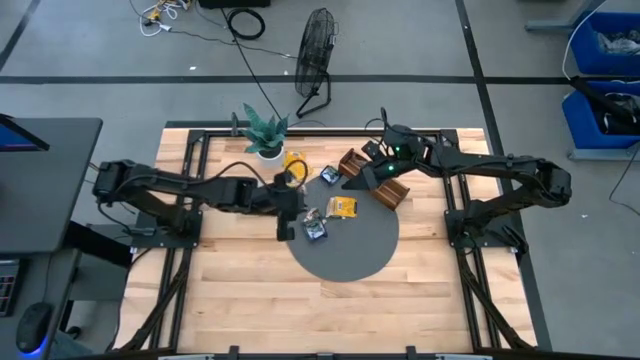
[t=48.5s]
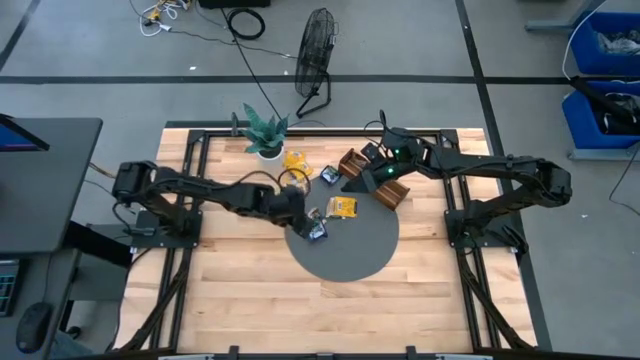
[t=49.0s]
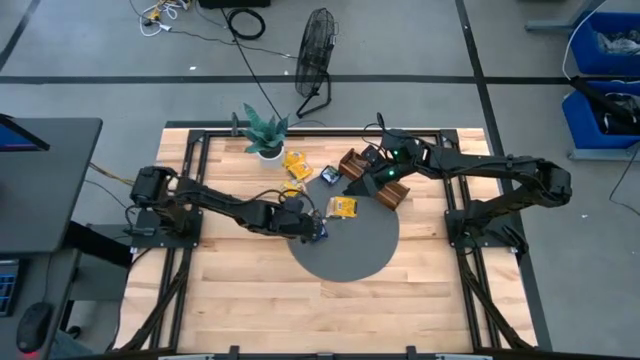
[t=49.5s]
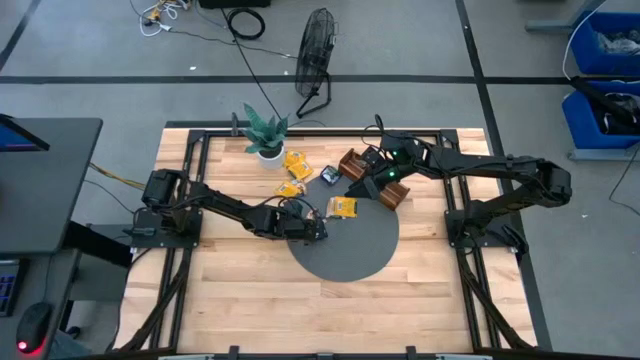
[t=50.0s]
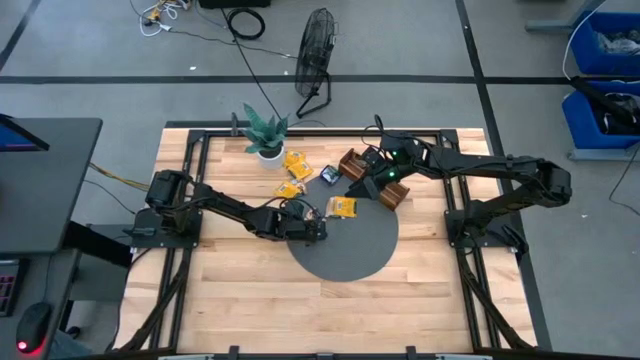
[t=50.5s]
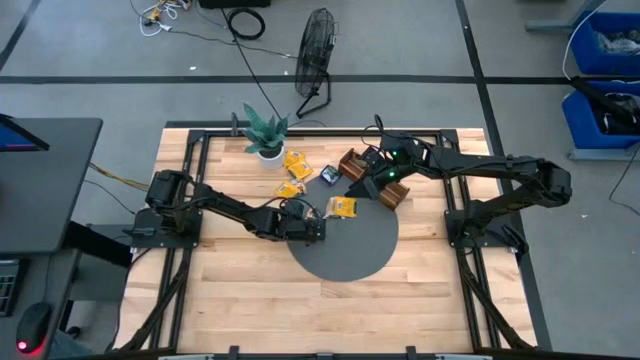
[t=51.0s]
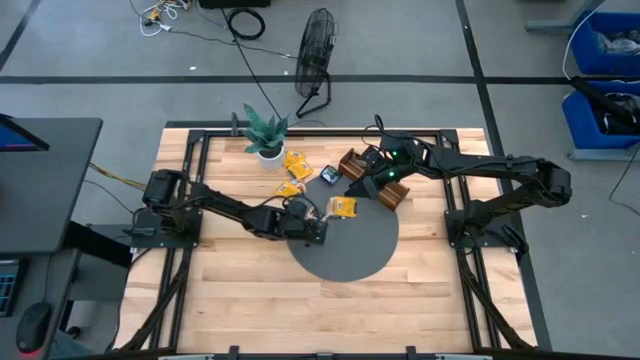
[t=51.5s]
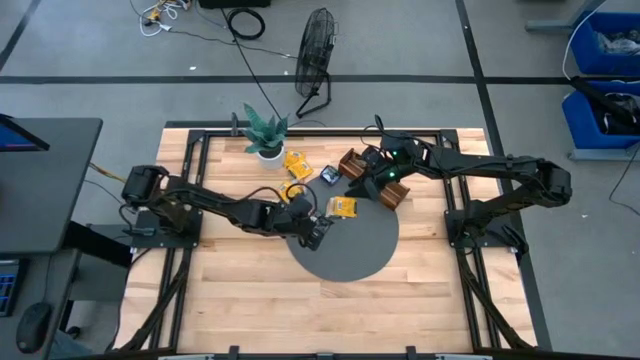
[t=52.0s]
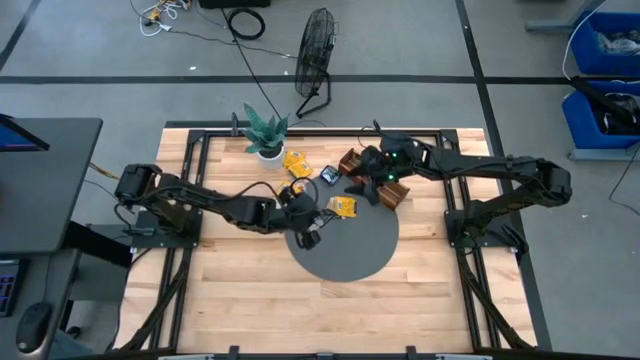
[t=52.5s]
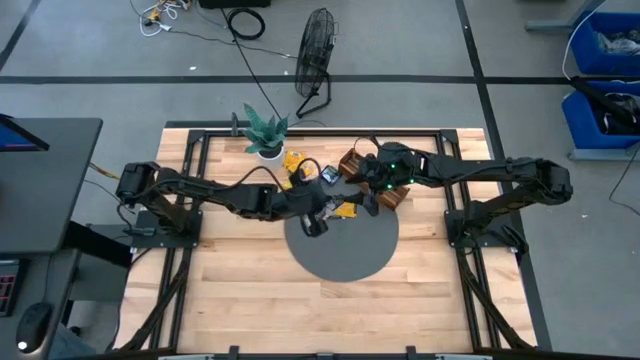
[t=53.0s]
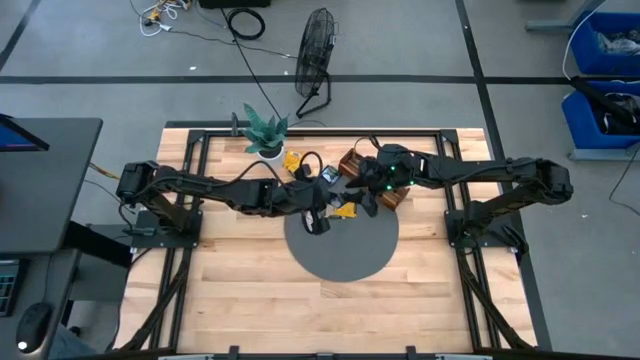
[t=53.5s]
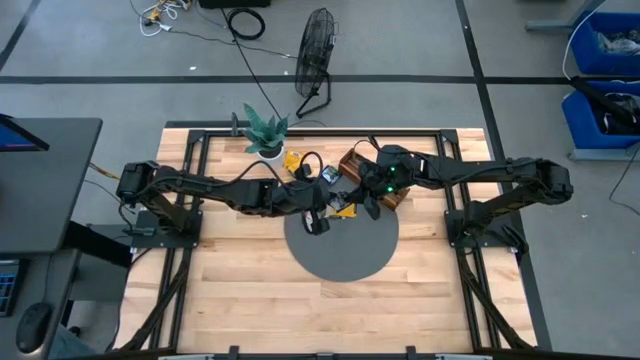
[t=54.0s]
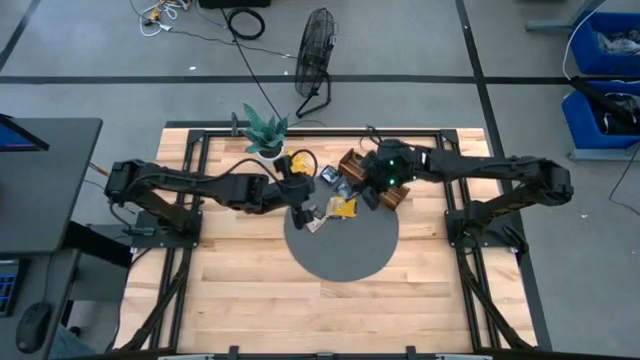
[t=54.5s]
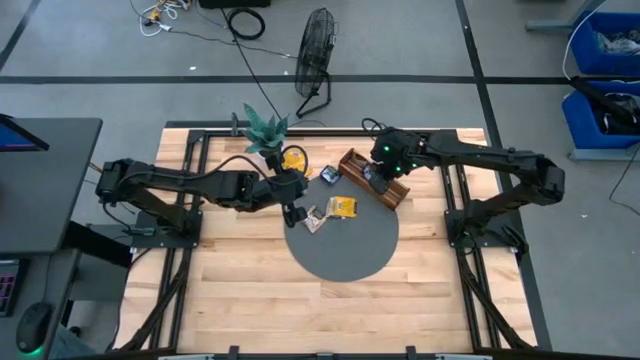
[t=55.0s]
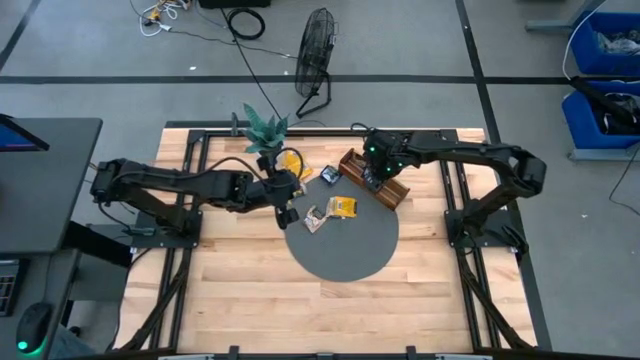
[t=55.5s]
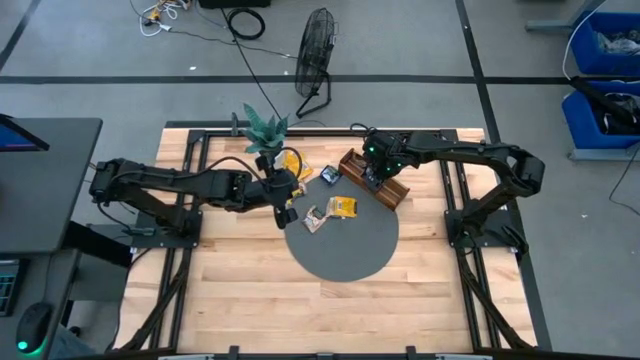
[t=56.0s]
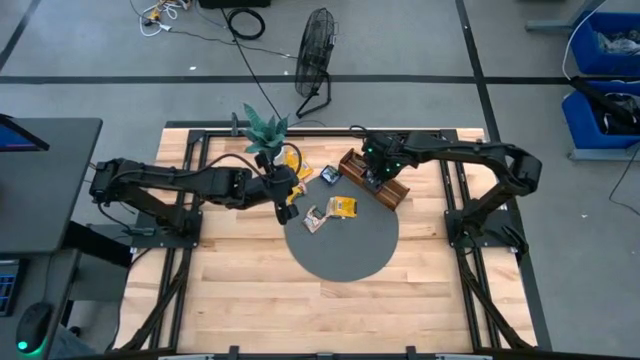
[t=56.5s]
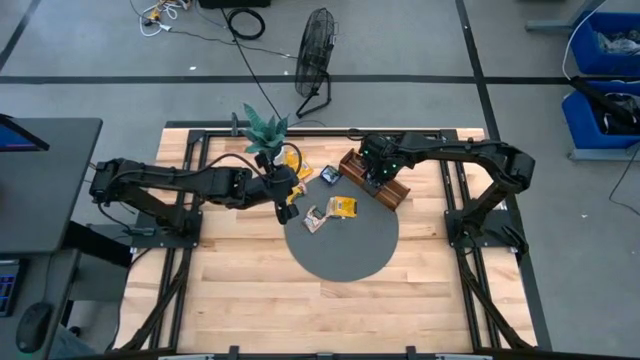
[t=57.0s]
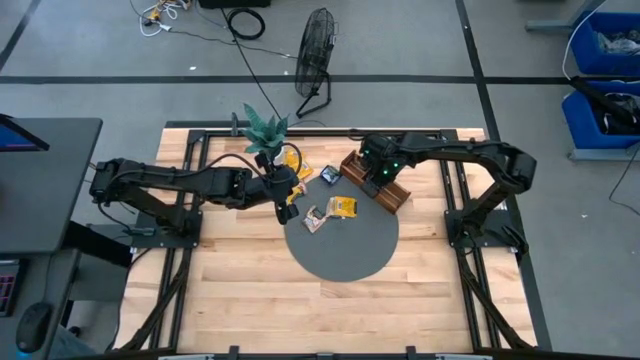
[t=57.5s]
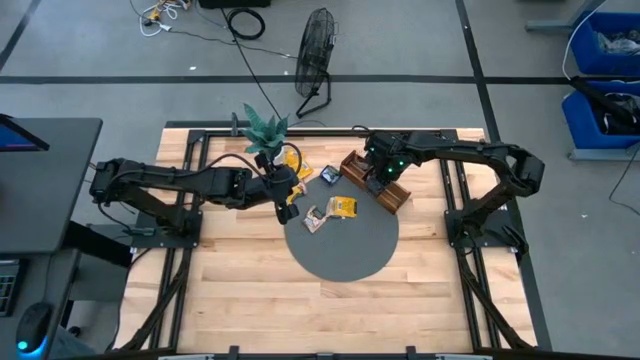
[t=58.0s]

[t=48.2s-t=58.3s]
Task: Pick & Place Tea
Put the black tea bag into the middle section of the wooden organizer

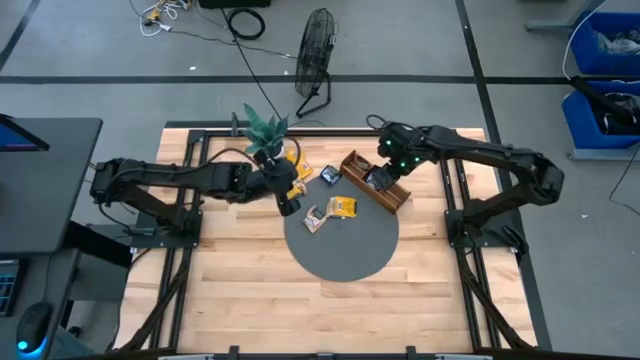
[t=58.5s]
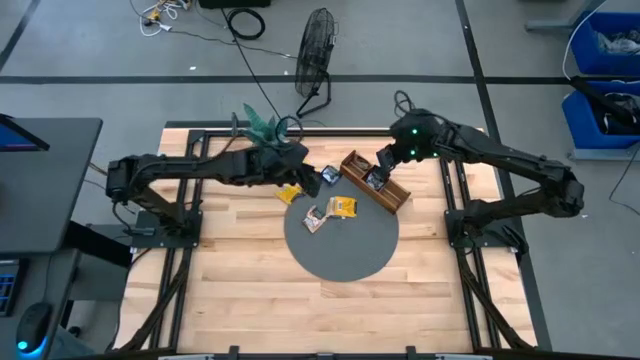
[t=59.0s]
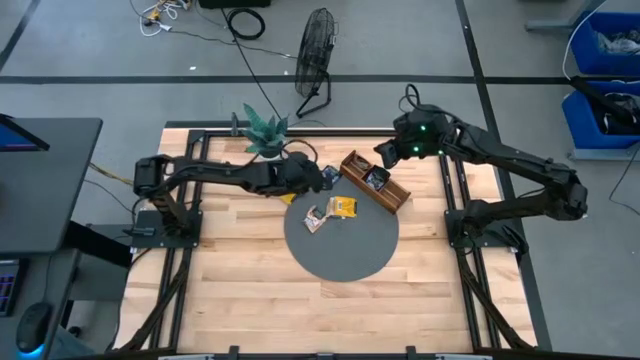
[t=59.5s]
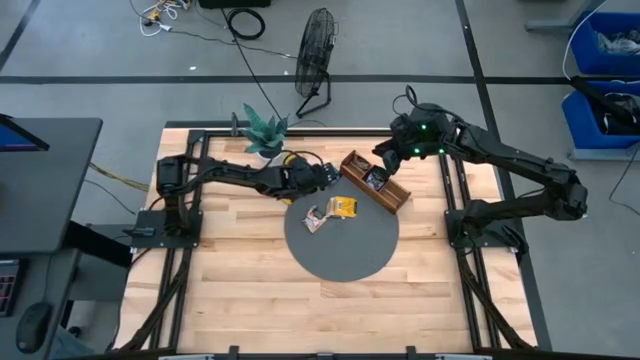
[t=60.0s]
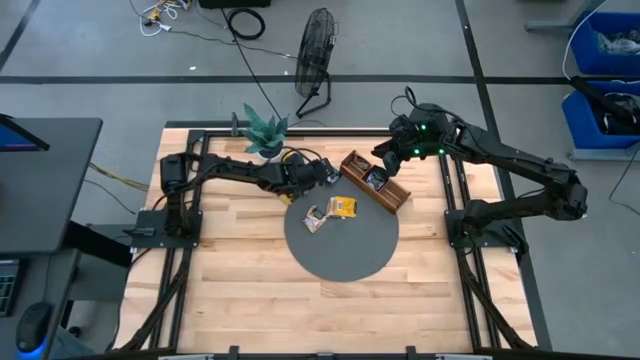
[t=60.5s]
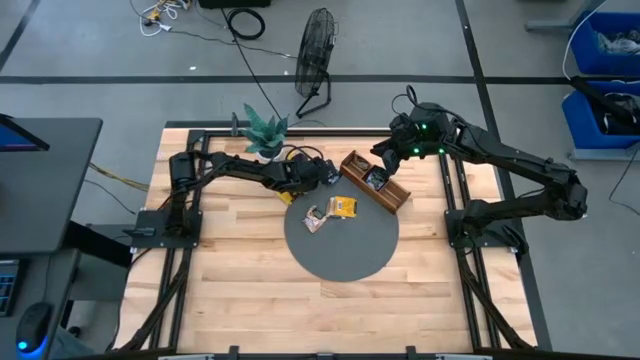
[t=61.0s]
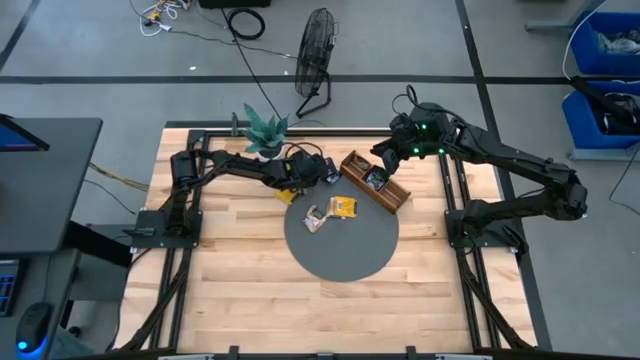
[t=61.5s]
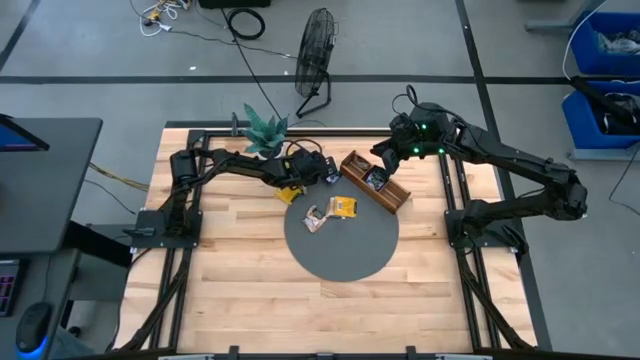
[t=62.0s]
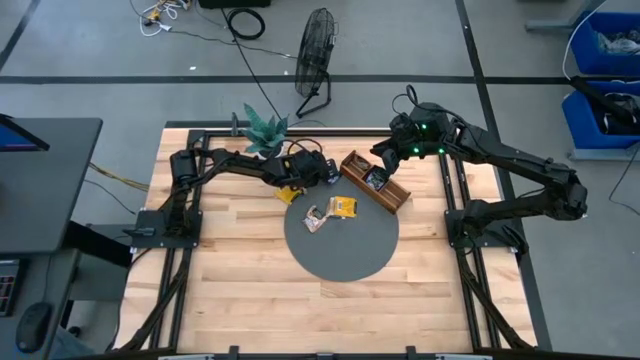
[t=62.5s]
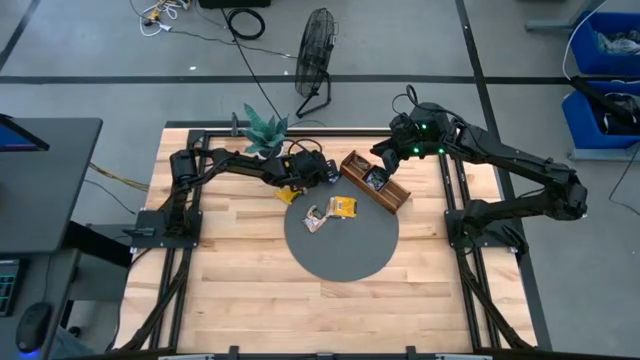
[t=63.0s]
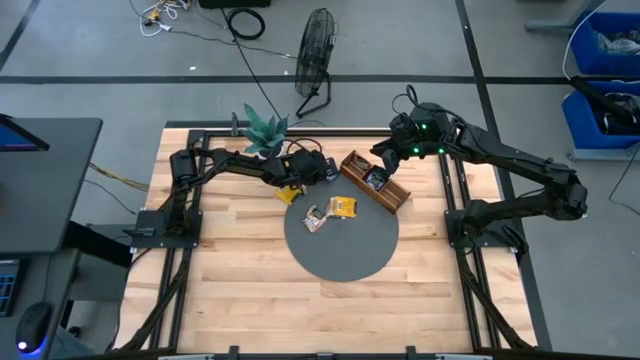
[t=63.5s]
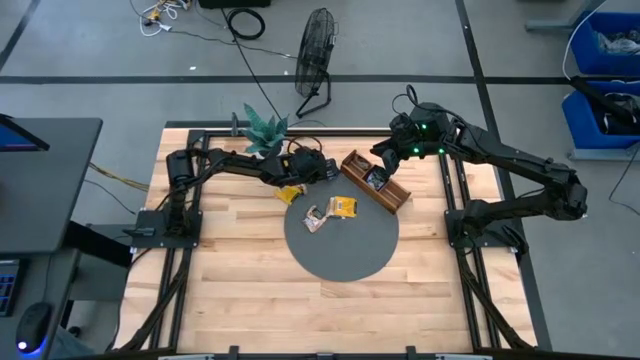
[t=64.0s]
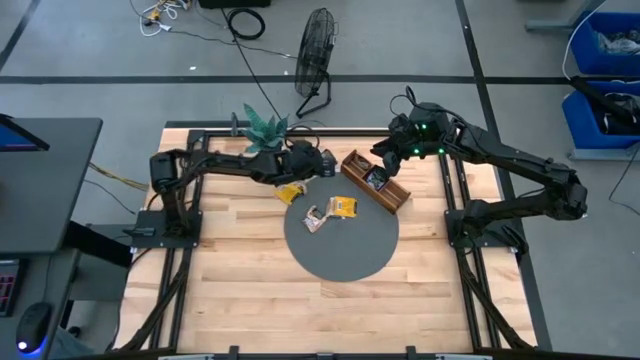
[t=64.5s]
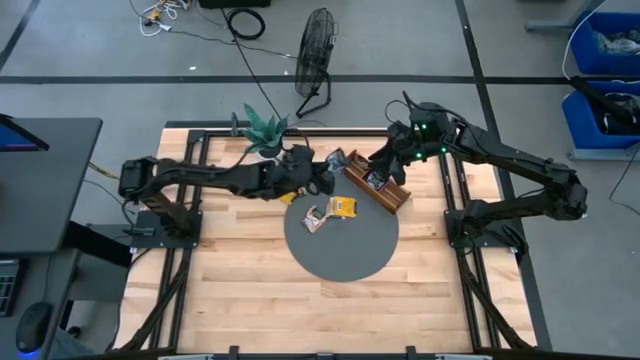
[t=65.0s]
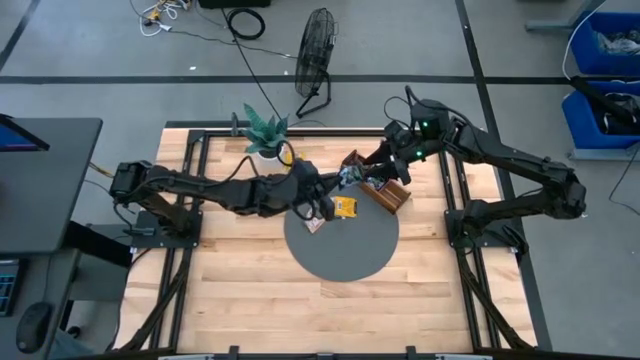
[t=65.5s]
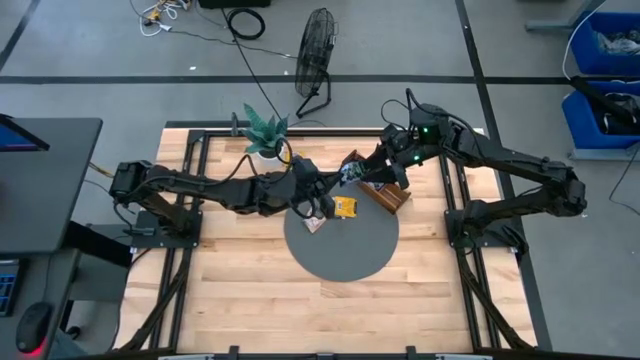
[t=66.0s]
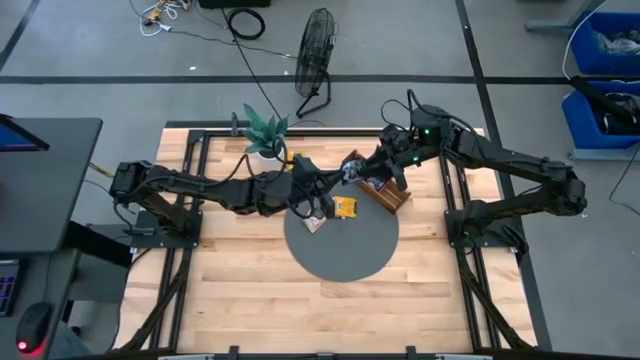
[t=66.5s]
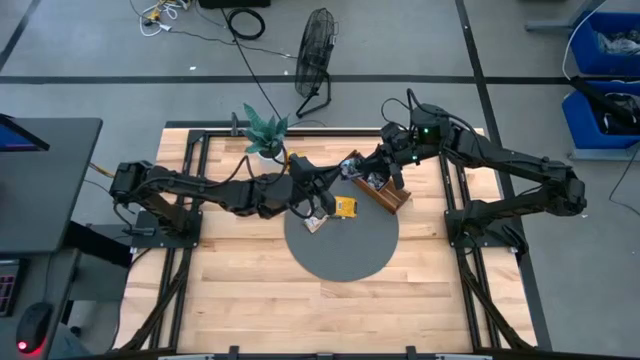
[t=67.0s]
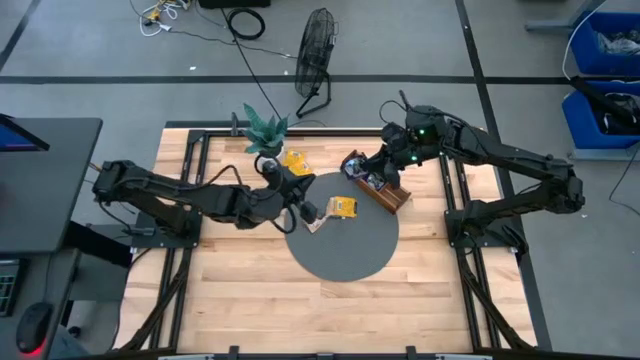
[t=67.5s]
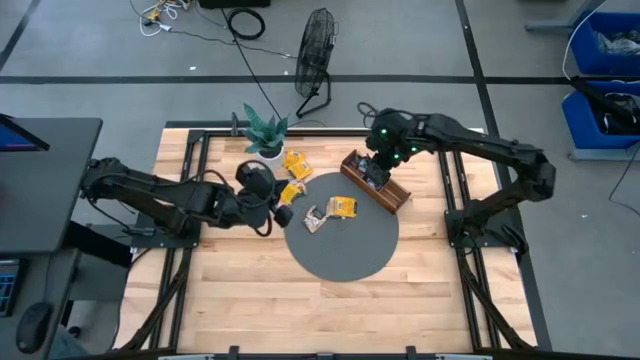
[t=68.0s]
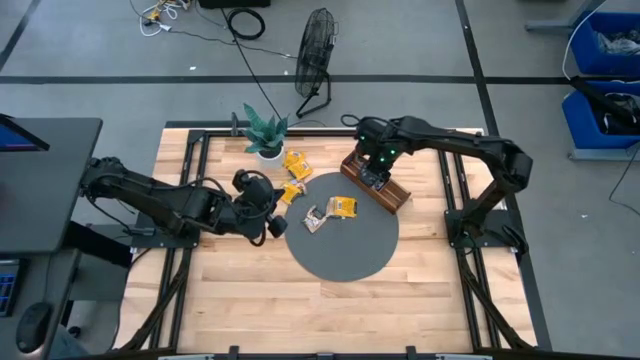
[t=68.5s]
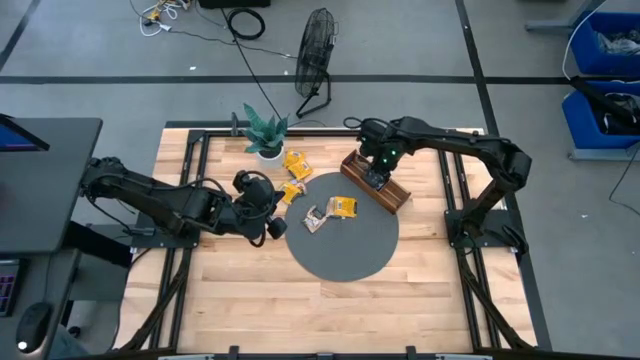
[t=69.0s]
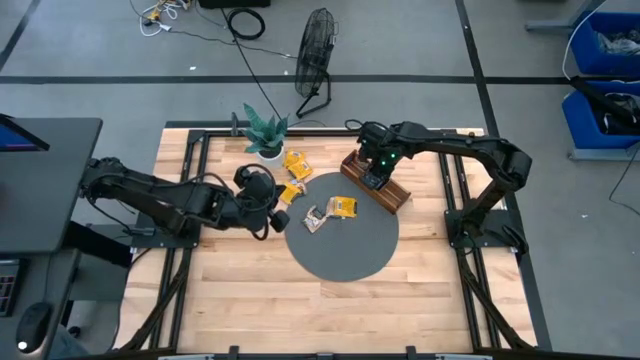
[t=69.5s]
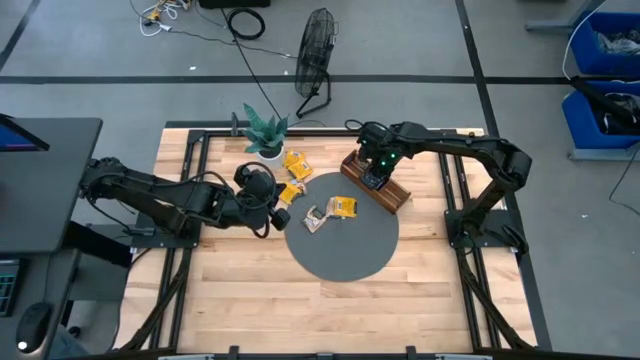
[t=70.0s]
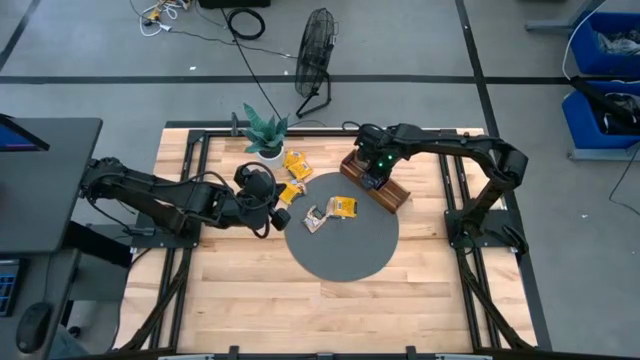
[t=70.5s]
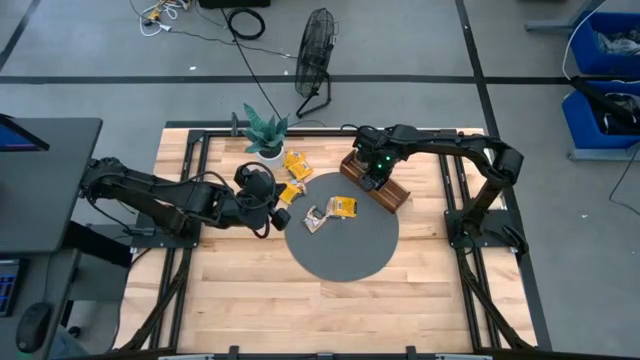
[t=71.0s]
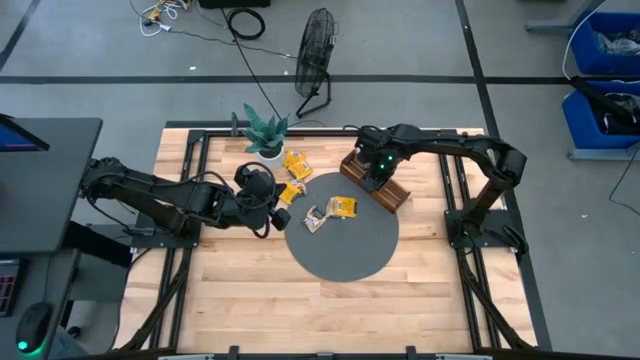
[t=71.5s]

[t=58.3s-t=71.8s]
Put the black tea bag into the middle section of the wooden organizer
